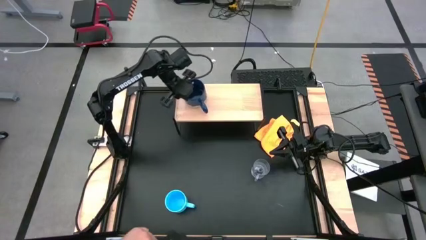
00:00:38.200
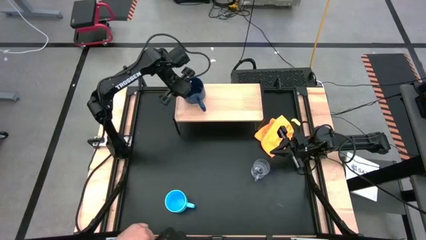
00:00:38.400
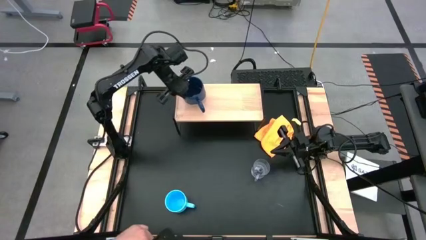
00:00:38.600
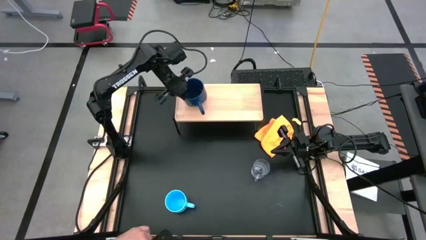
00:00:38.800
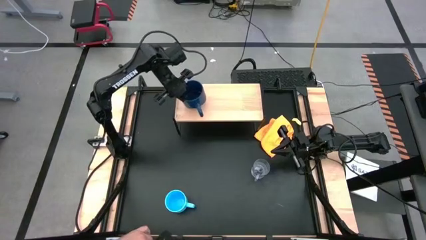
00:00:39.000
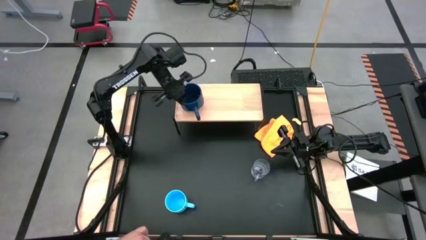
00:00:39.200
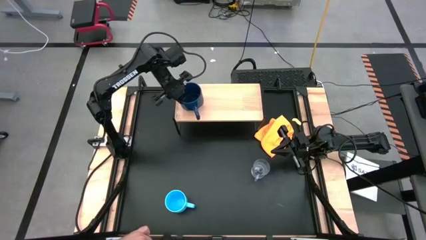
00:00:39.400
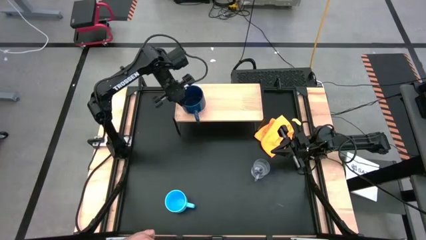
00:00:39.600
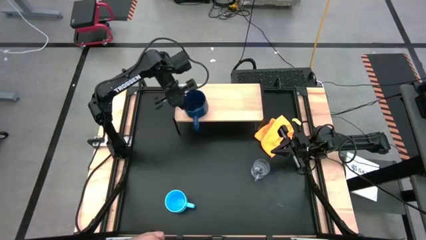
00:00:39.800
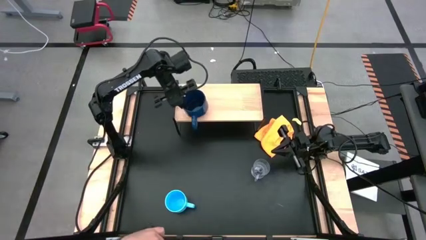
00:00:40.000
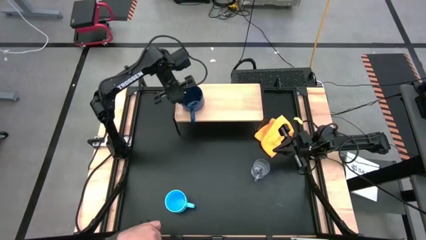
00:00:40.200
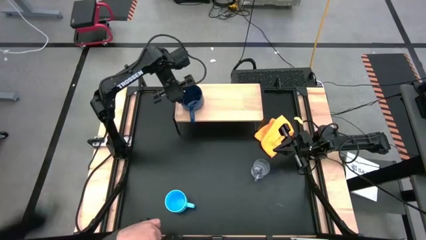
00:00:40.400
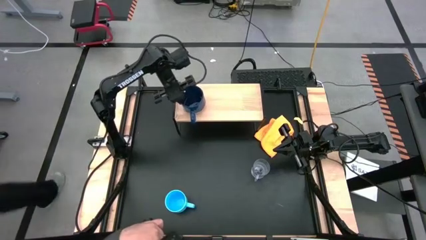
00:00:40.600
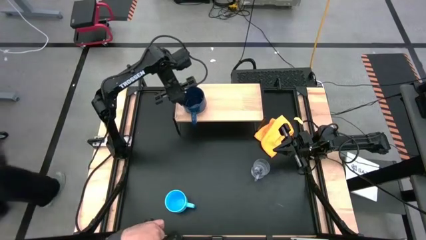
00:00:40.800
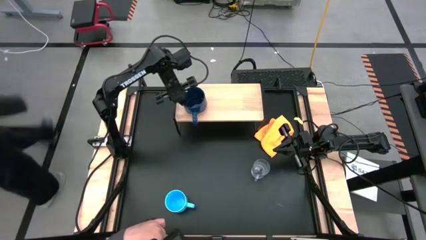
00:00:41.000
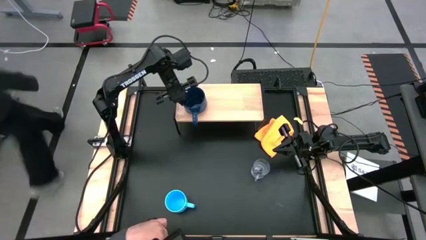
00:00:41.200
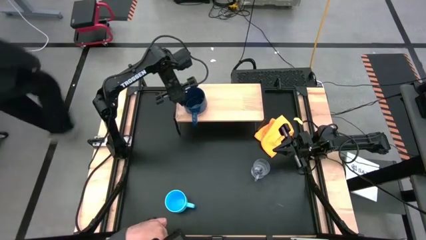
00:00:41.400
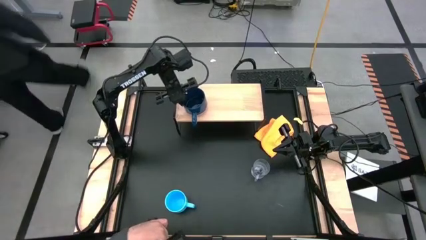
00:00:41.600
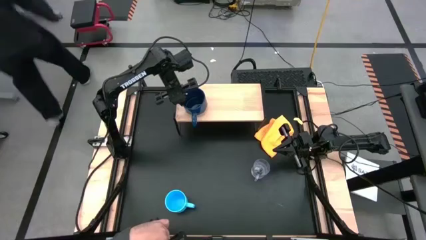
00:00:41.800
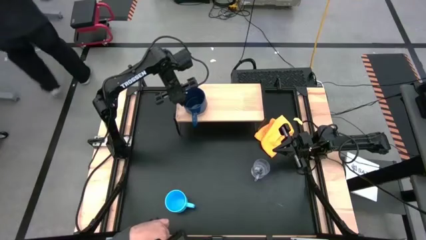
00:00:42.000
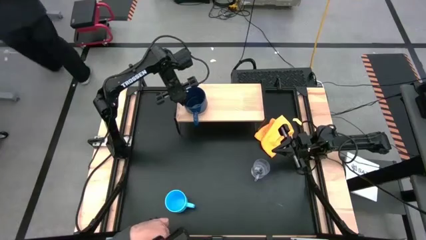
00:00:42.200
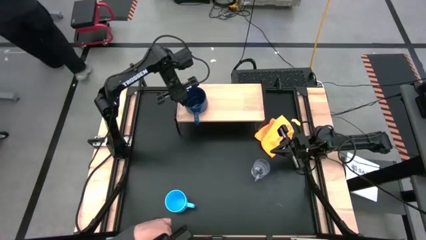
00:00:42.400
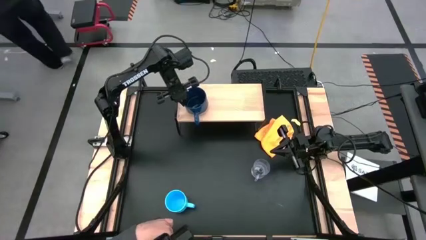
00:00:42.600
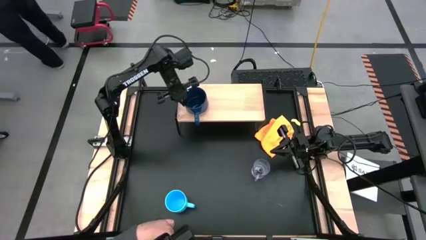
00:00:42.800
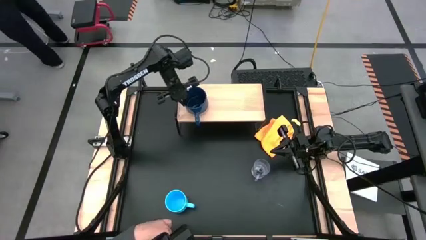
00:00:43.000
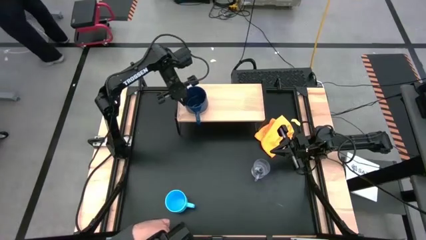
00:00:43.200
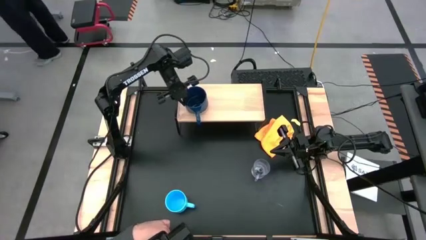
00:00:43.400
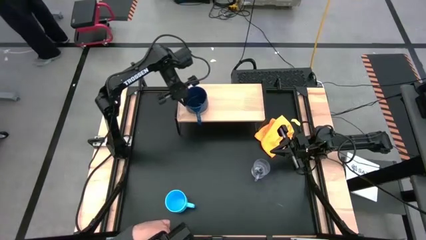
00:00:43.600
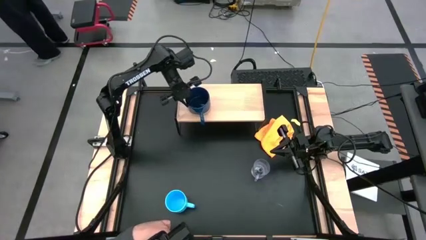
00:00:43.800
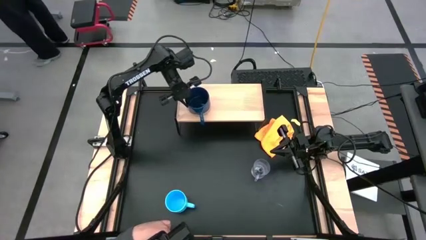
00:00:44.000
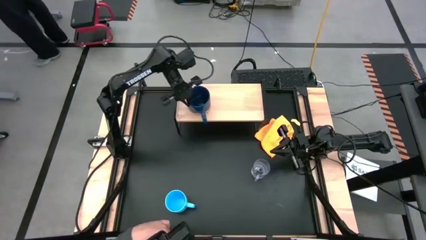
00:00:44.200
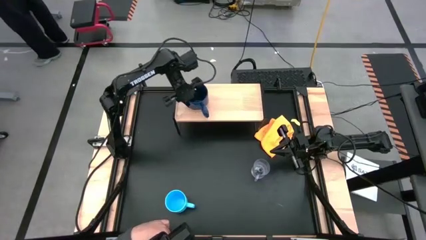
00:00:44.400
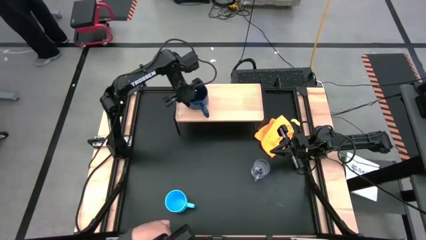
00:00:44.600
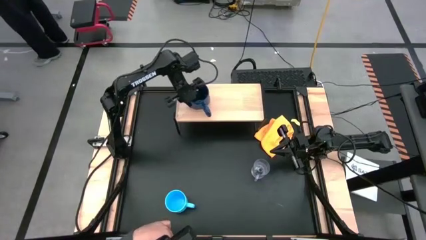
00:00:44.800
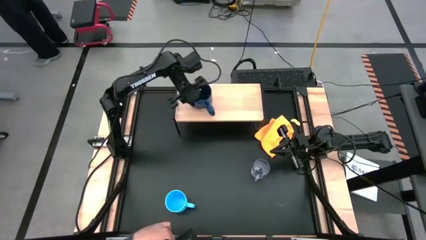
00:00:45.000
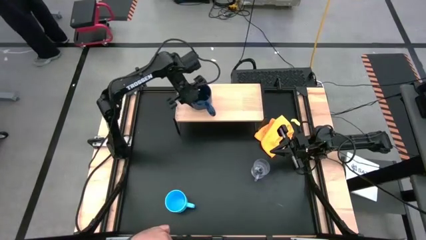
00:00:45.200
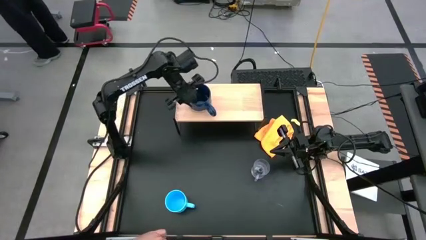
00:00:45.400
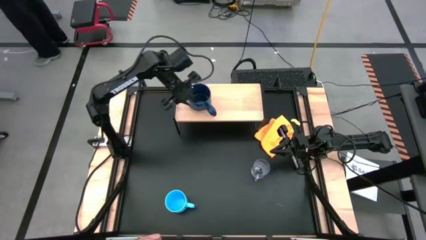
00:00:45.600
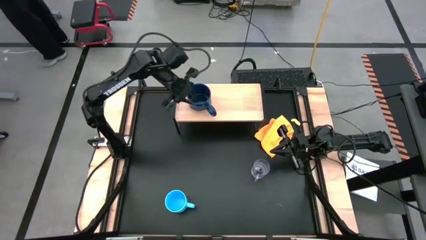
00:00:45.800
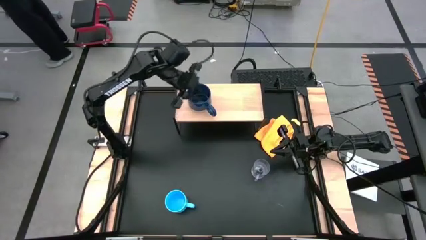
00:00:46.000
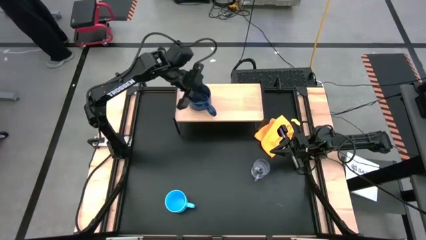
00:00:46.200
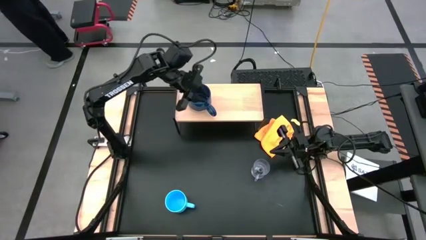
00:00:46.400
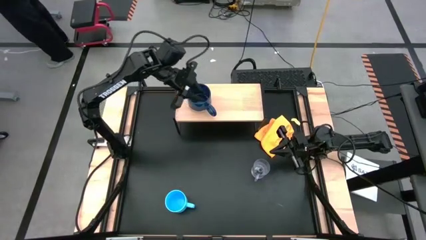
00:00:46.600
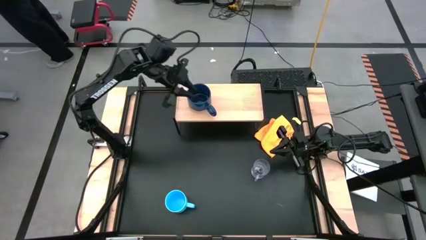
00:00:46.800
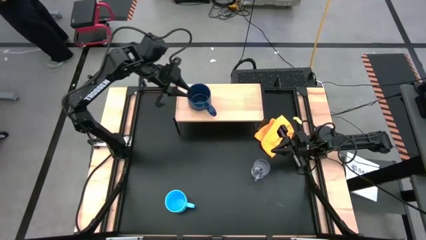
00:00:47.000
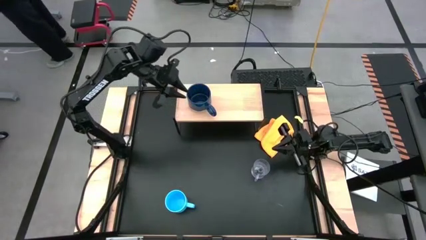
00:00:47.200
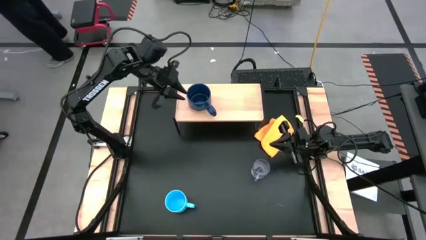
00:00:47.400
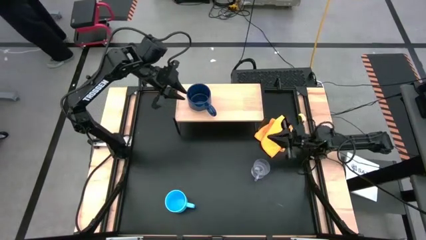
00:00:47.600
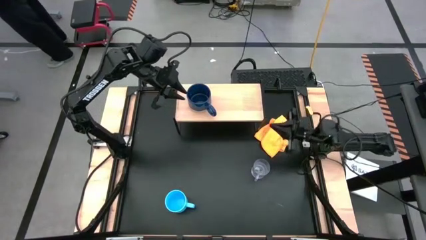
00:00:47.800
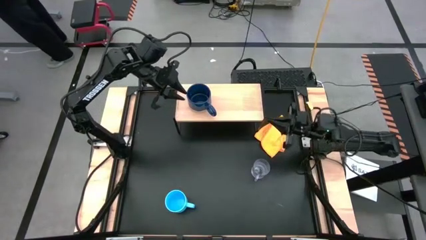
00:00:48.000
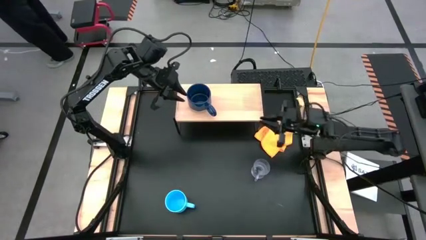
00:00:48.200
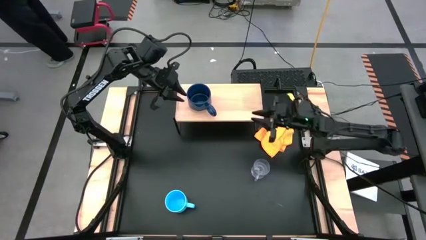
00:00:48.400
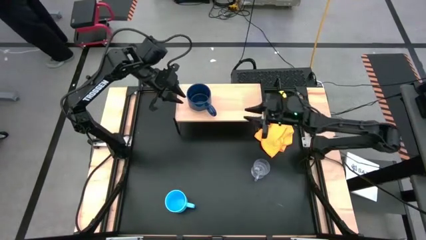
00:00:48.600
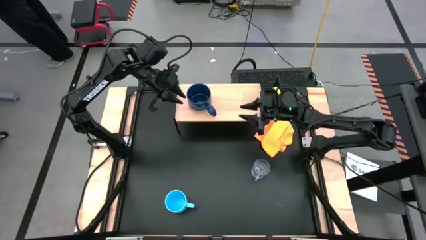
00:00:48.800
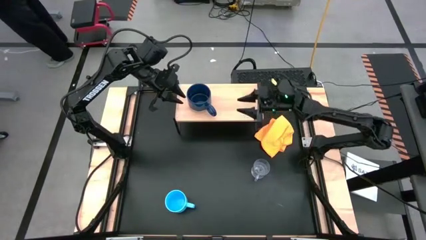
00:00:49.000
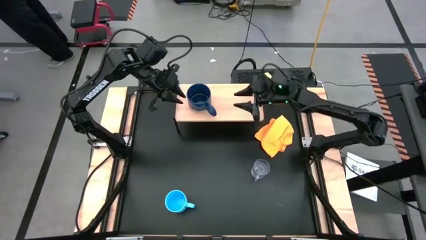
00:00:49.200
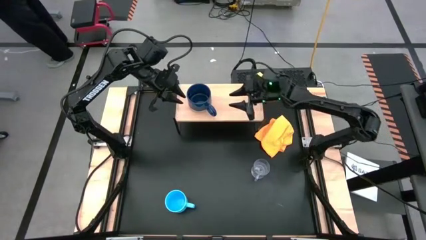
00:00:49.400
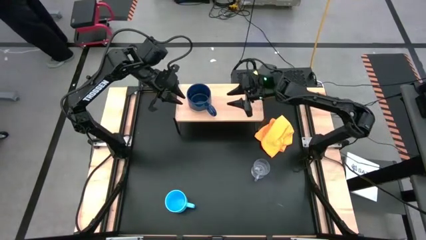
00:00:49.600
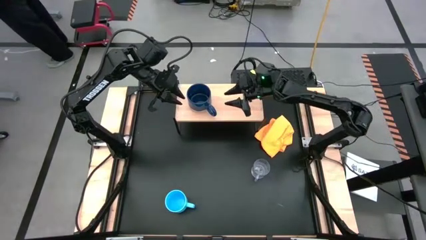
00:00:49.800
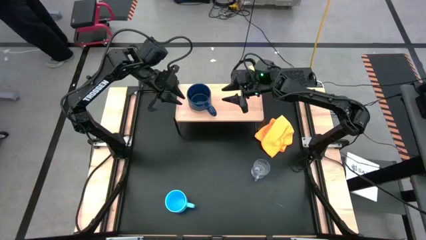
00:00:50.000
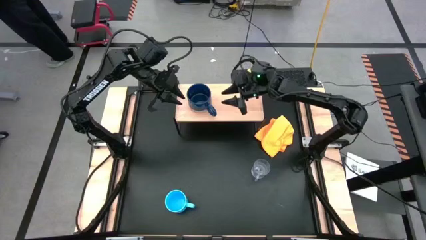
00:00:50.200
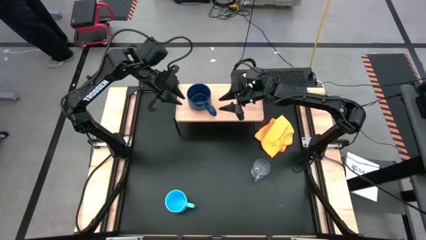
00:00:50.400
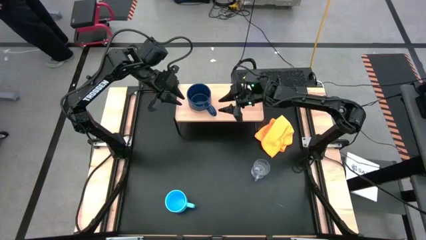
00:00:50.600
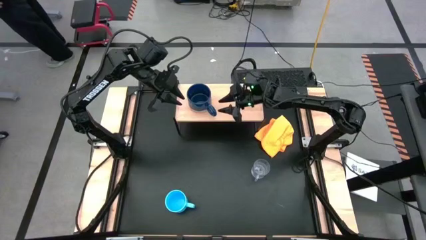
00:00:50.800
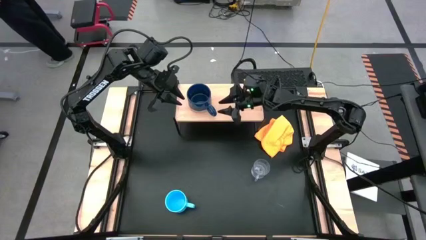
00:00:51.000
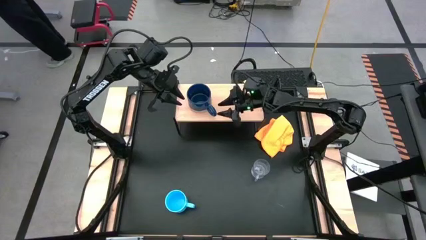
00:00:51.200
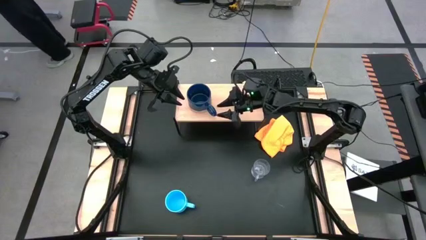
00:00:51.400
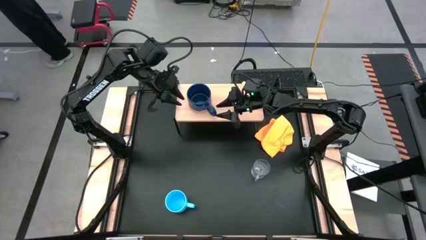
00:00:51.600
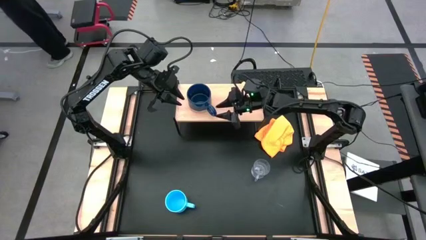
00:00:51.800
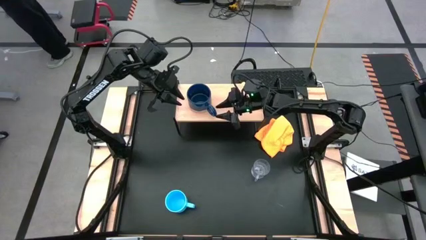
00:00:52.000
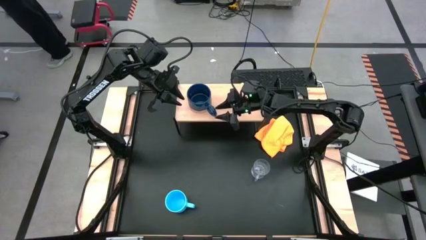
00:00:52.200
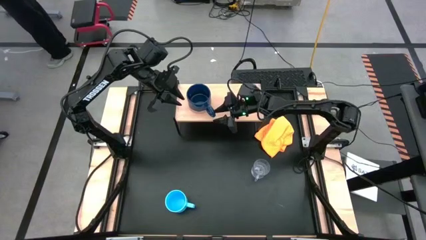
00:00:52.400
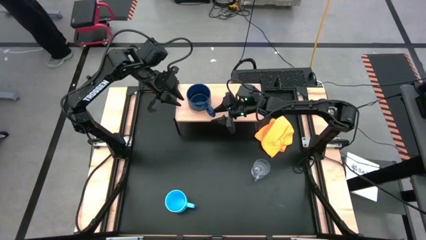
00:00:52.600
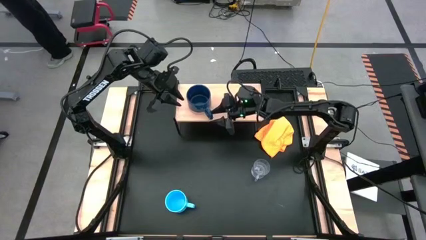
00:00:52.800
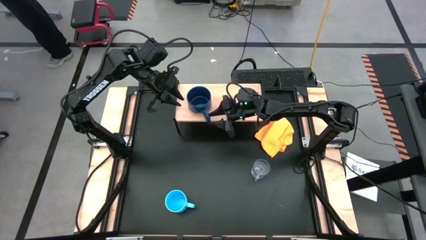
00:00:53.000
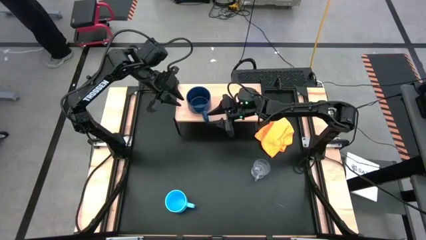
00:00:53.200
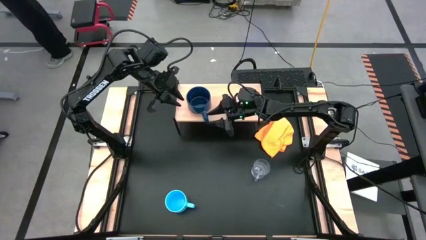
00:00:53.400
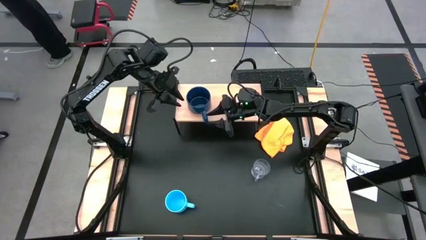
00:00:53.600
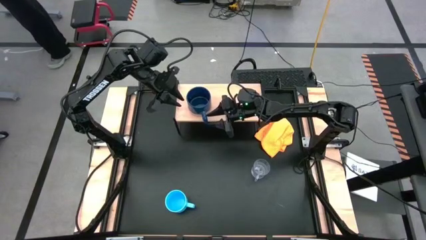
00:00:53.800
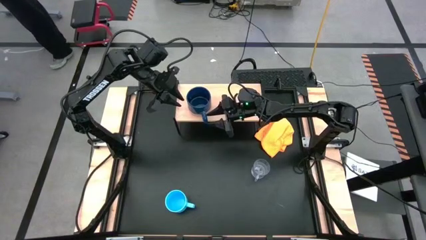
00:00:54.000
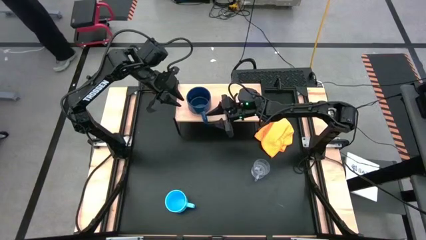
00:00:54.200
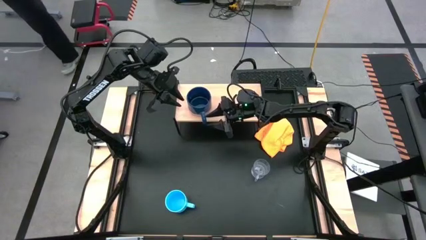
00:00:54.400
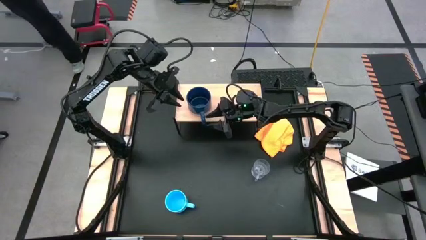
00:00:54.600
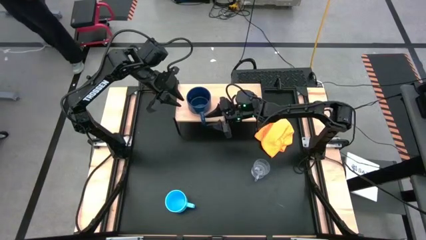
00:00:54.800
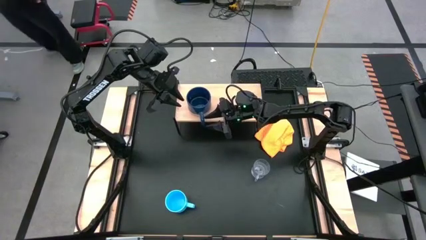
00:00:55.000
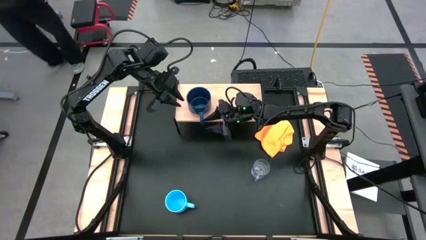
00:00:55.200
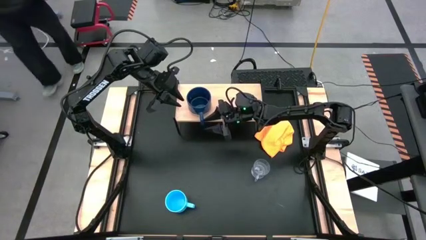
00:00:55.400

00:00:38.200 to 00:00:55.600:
Task: Stack small to large cups/mugs on shelf
Put the dark blue mug on the shelf
